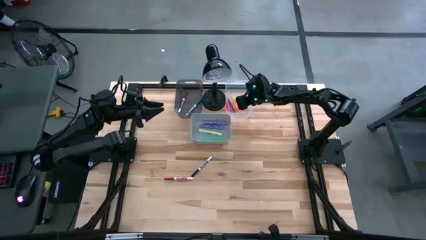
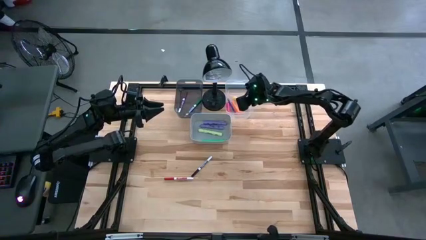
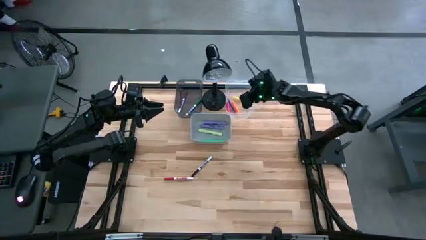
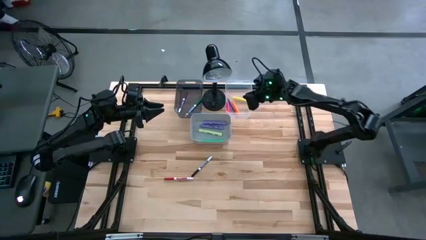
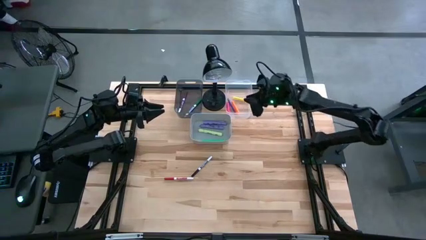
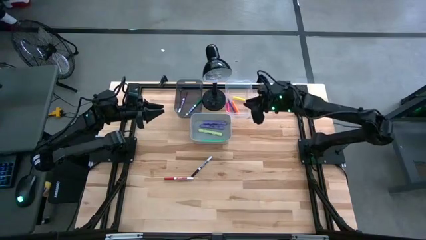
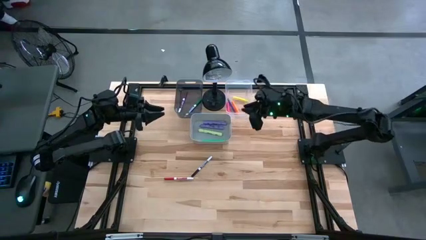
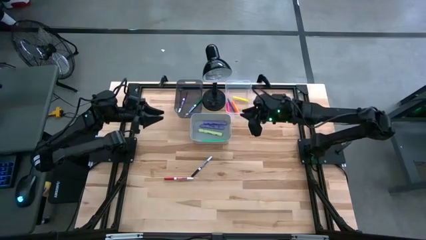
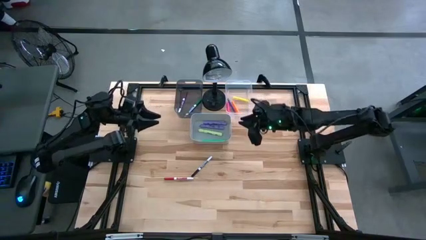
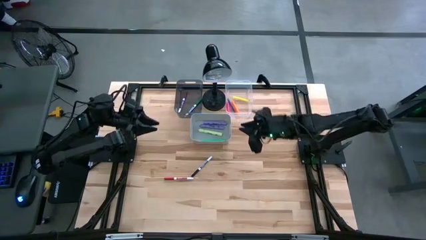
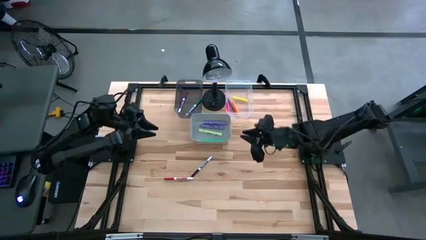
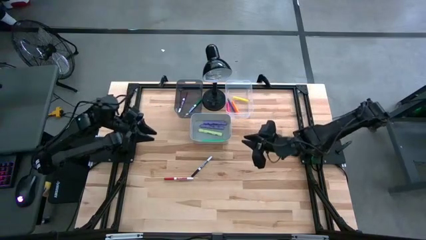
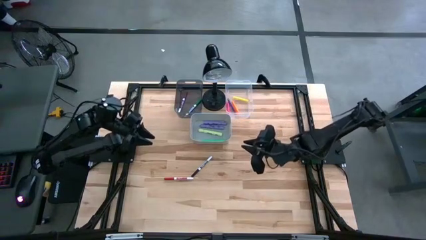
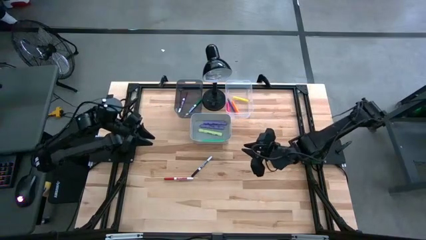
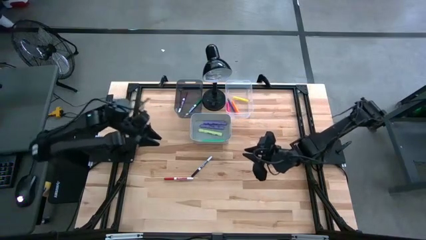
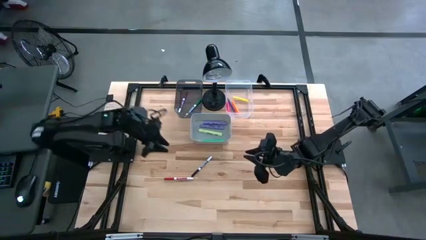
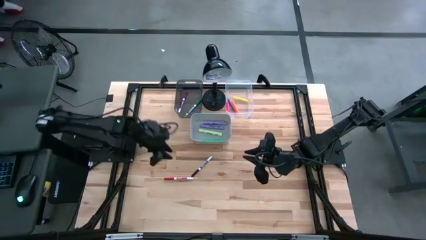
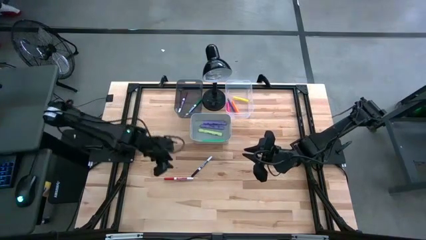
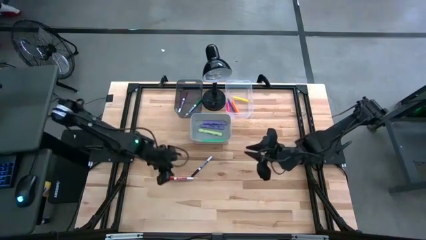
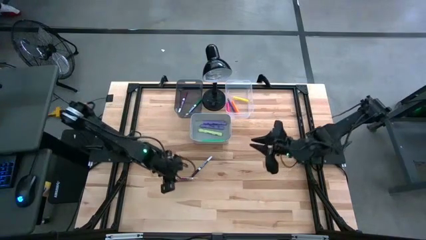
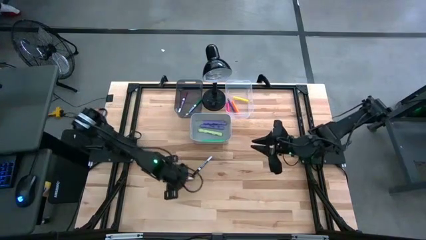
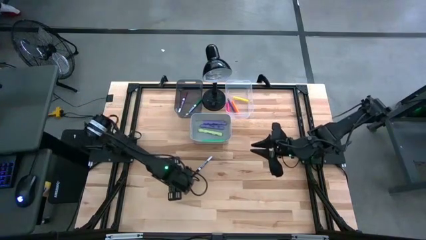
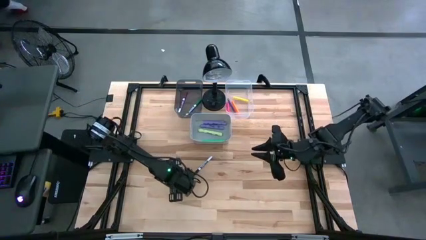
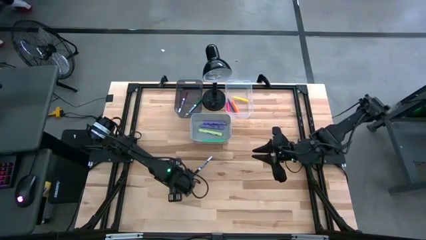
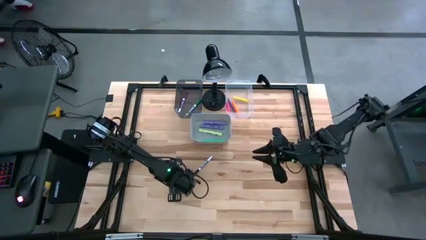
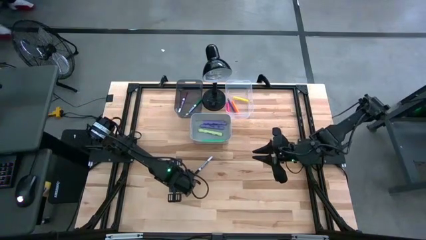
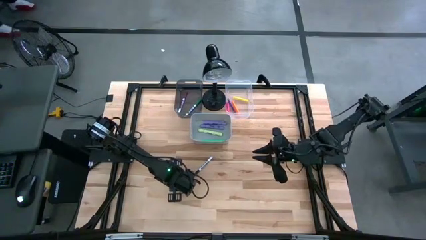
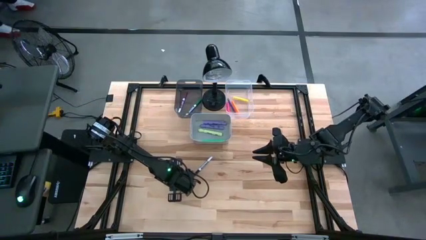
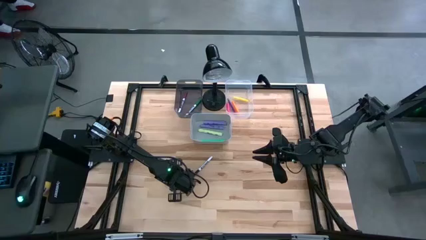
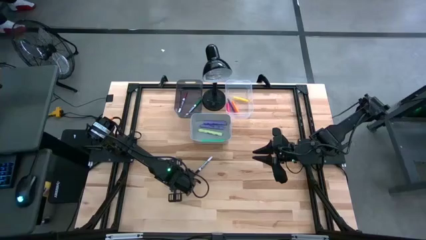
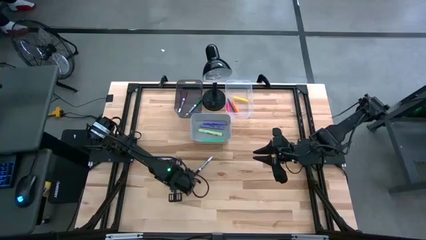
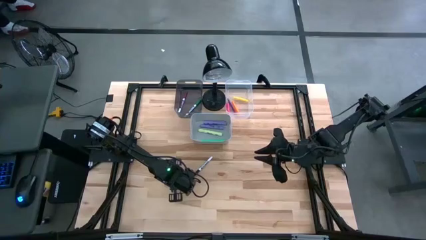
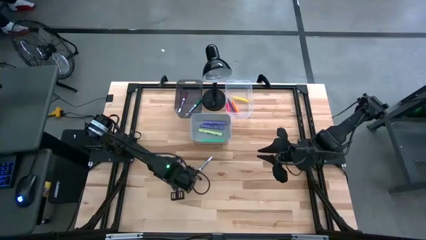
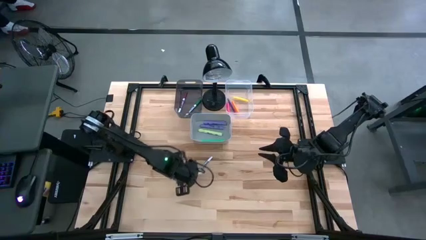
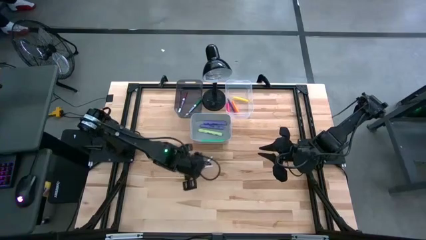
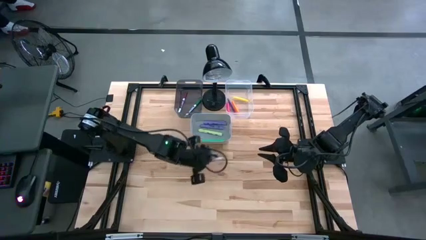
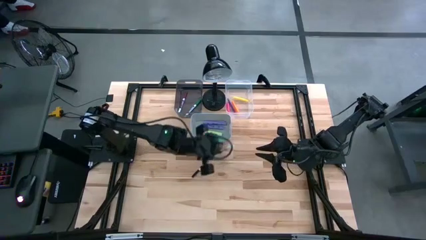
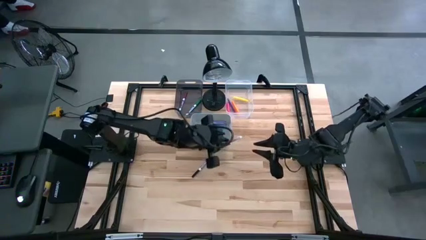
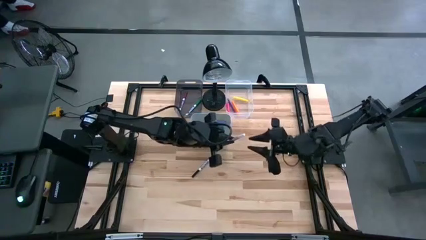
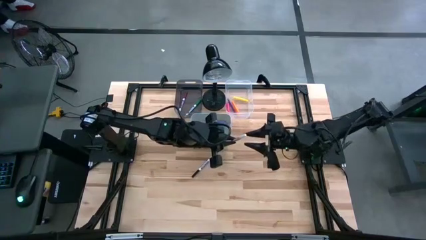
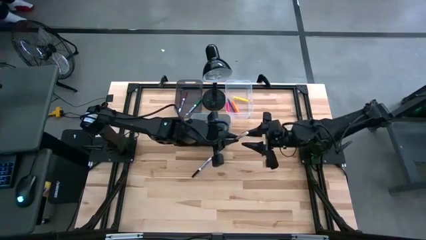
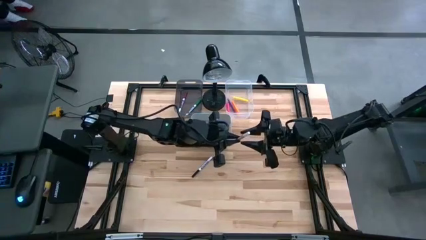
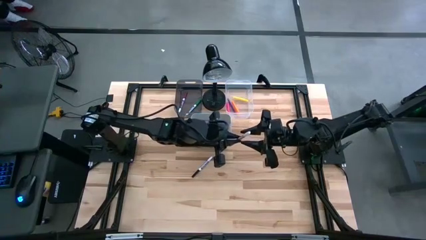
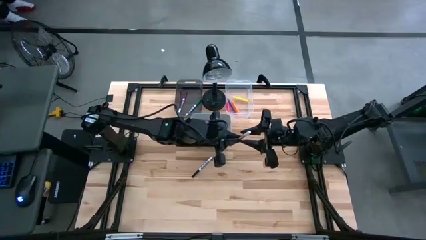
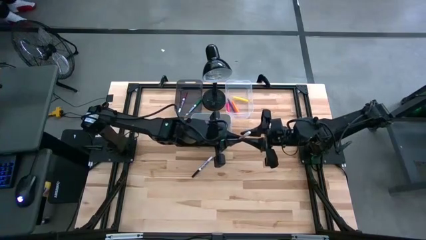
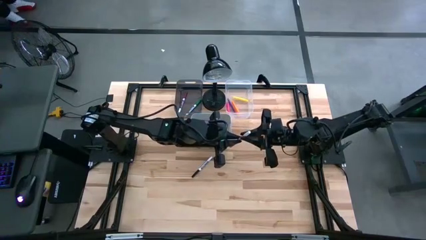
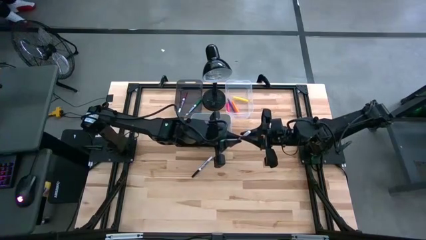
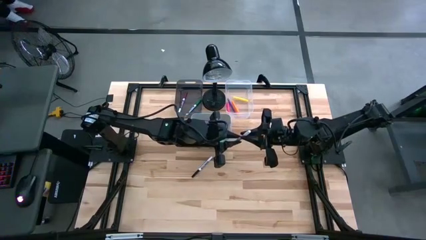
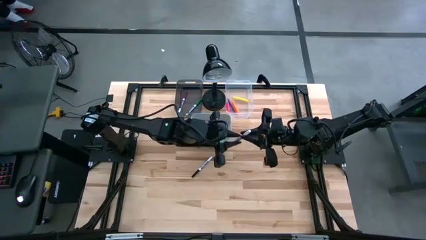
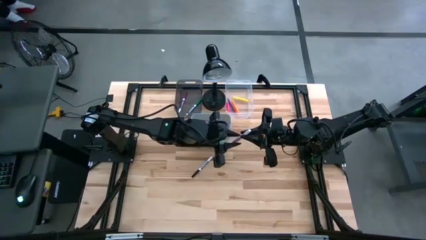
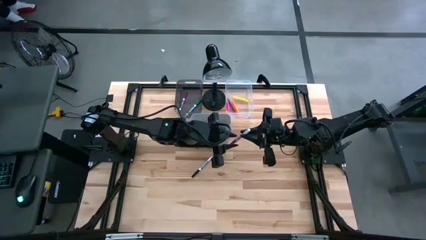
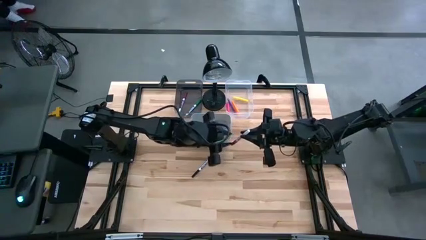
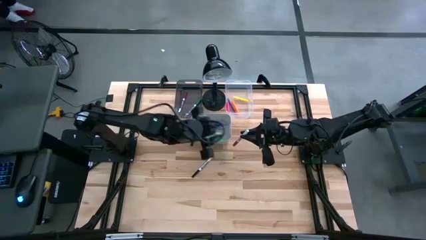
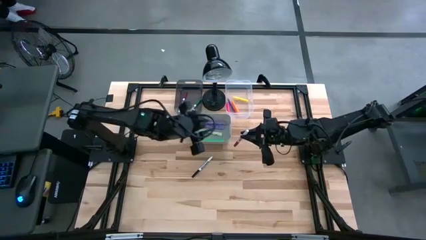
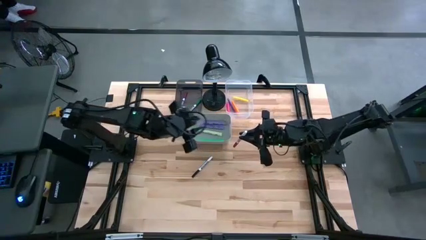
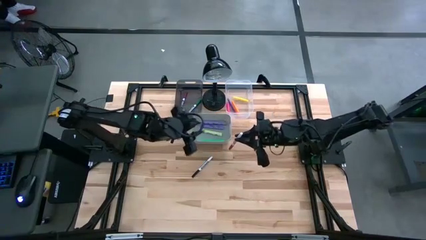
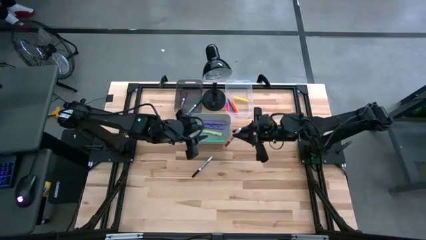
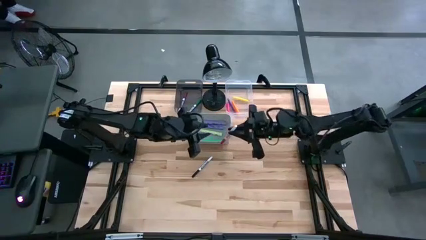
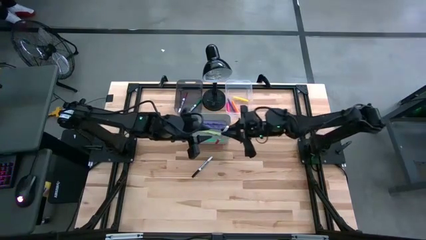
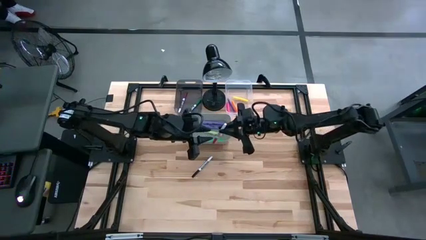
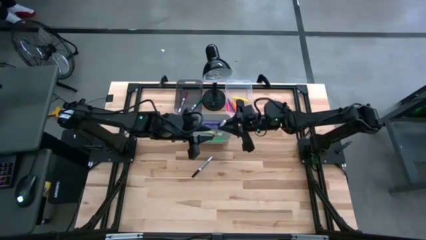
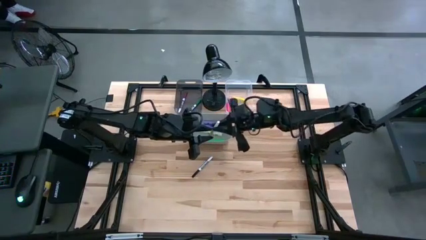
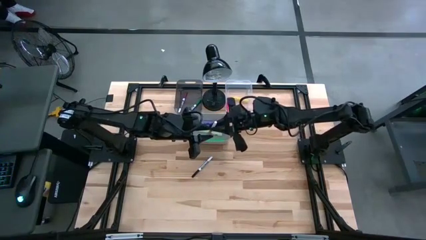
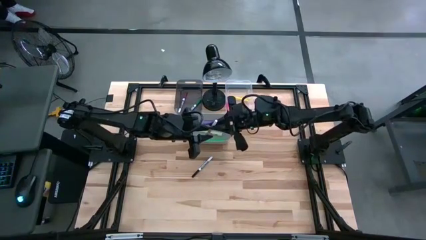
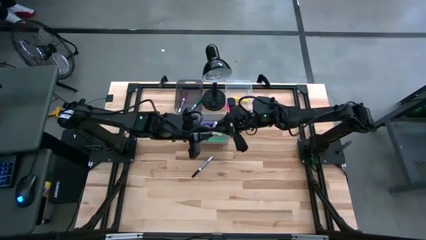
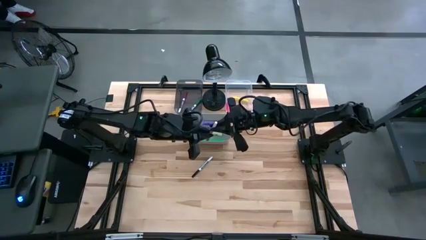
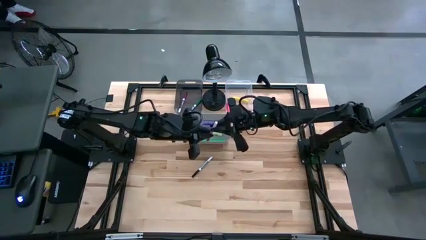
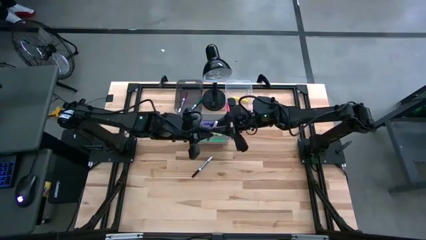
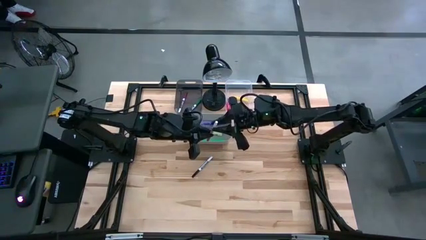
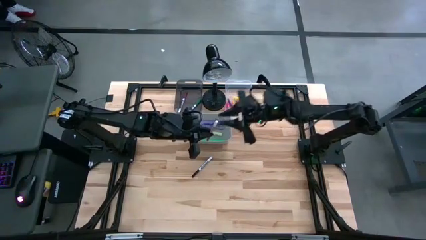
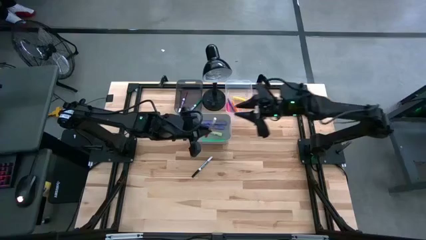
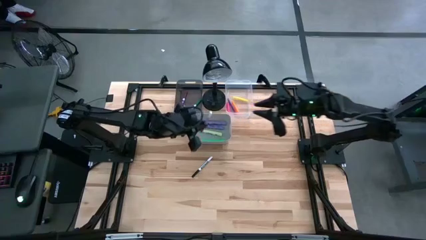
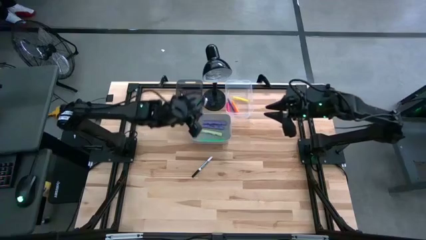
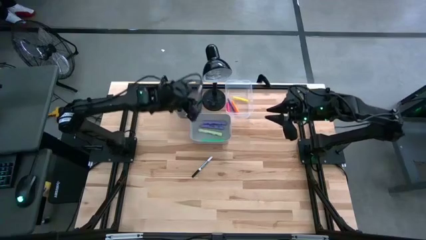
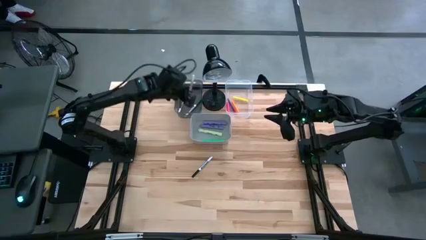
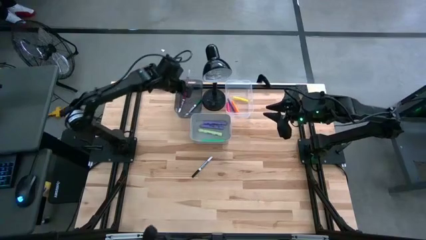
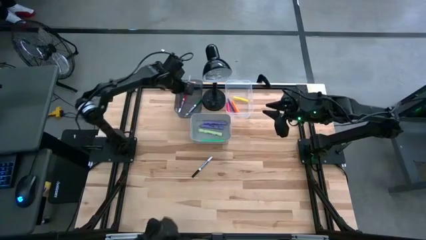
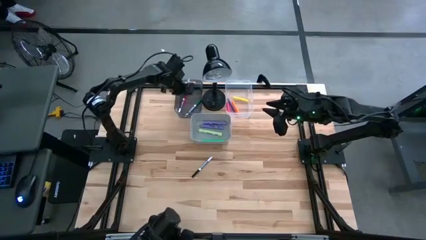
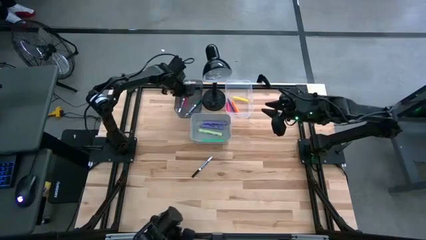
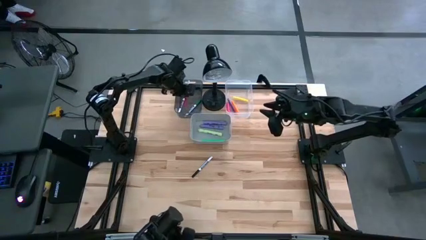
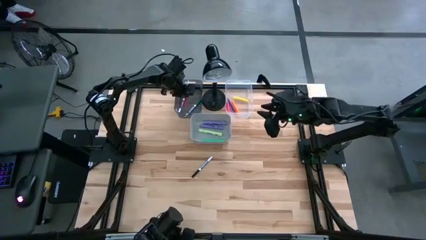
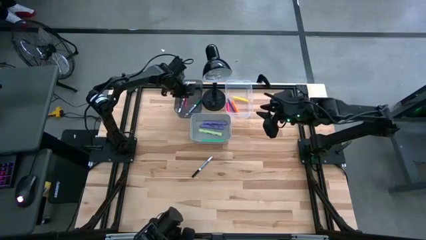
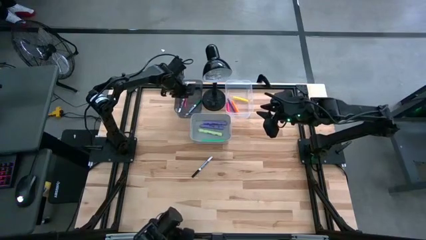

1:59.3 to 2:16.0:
Task: Pick & Place Markers
Put the medium red marker into the black bin
